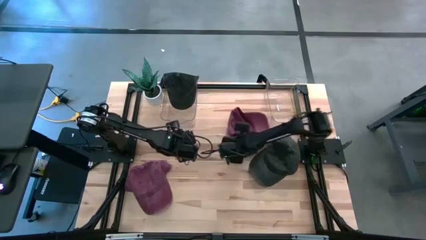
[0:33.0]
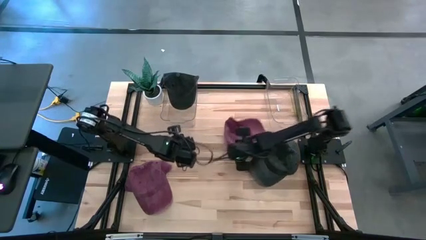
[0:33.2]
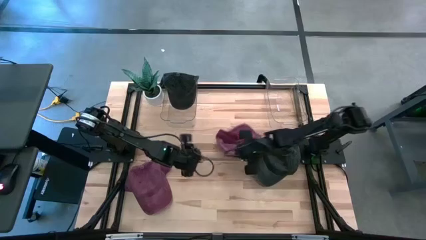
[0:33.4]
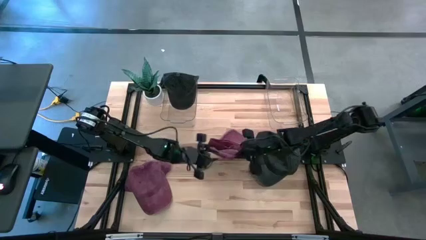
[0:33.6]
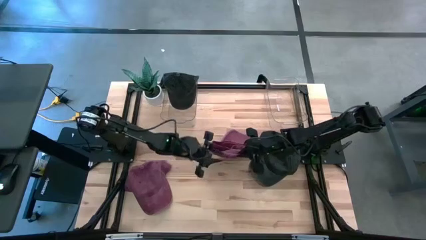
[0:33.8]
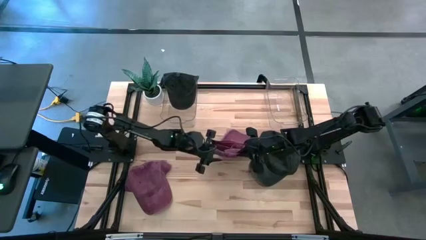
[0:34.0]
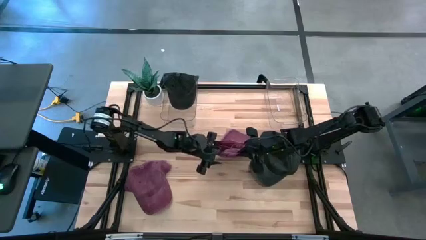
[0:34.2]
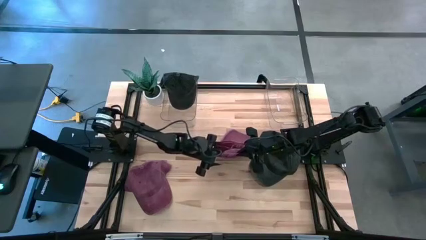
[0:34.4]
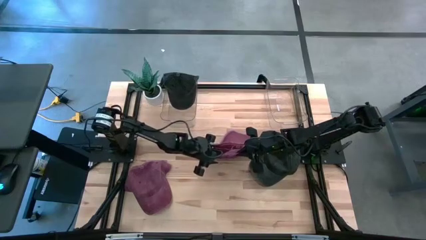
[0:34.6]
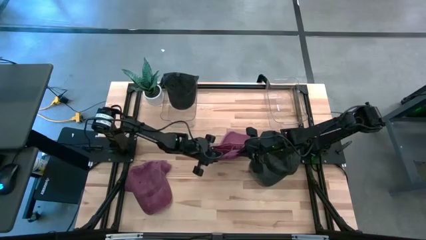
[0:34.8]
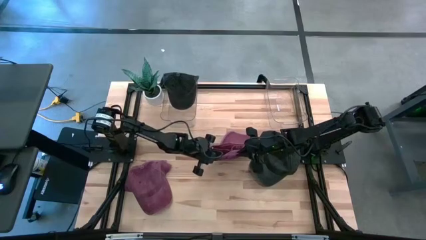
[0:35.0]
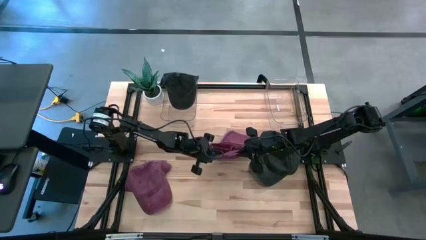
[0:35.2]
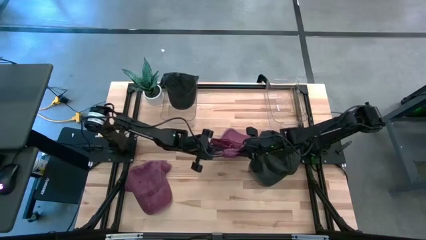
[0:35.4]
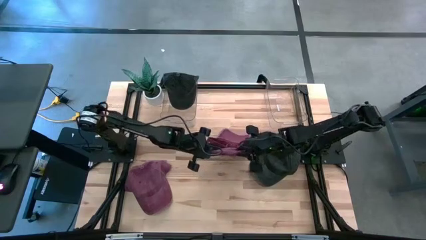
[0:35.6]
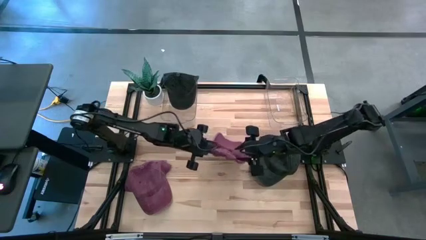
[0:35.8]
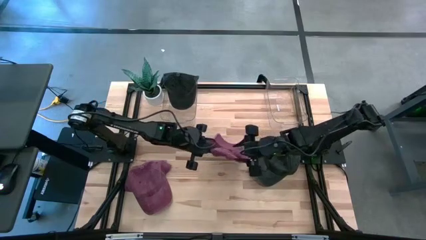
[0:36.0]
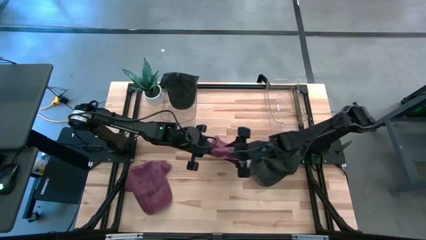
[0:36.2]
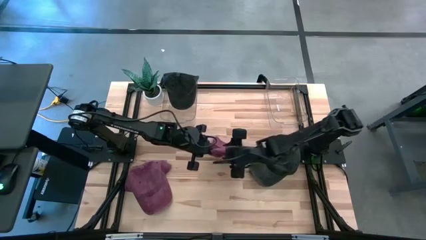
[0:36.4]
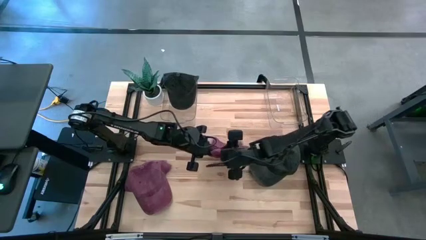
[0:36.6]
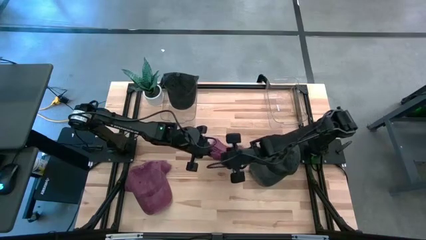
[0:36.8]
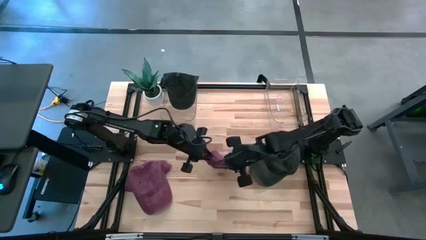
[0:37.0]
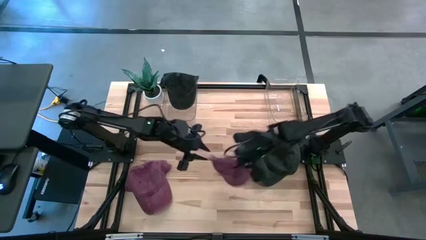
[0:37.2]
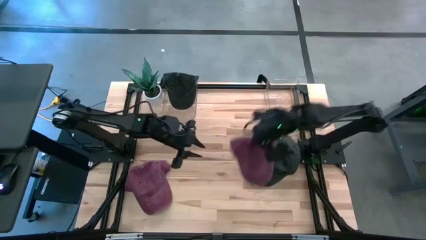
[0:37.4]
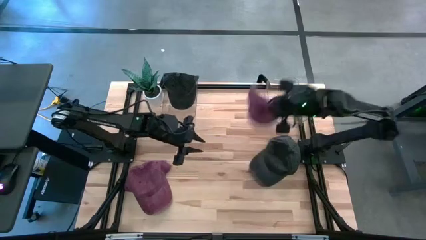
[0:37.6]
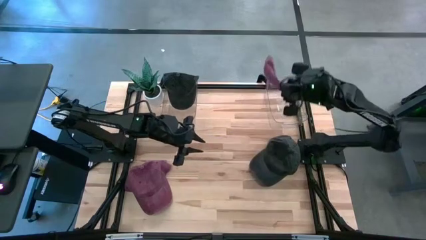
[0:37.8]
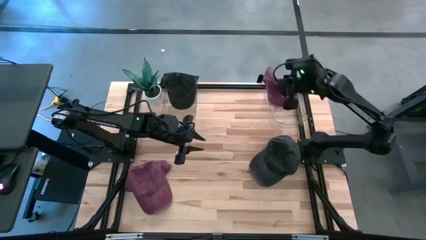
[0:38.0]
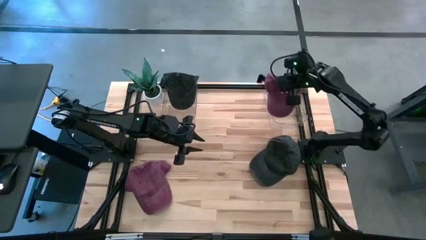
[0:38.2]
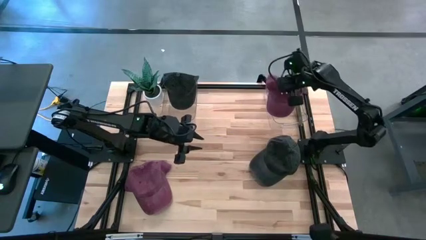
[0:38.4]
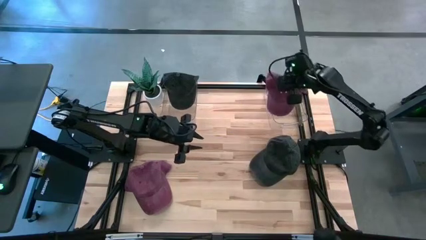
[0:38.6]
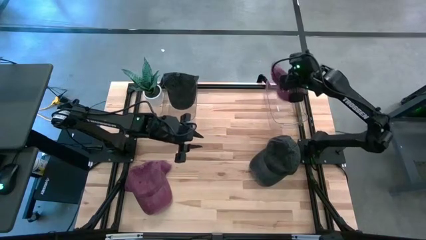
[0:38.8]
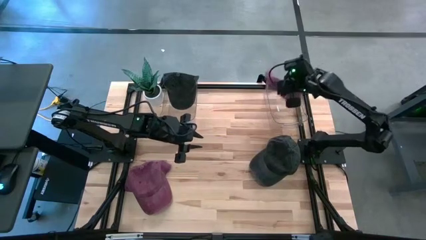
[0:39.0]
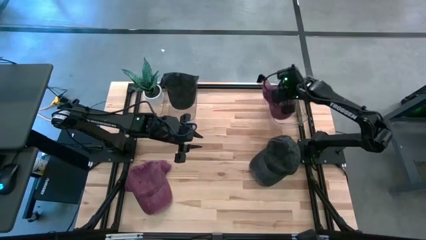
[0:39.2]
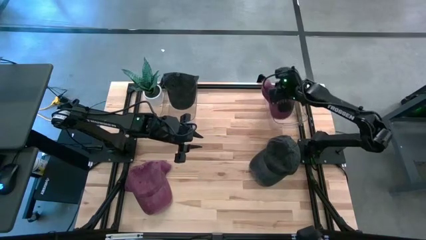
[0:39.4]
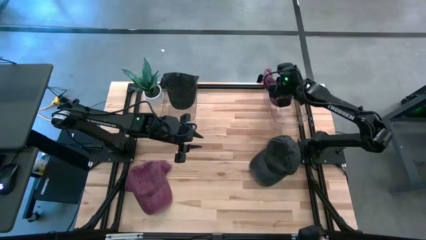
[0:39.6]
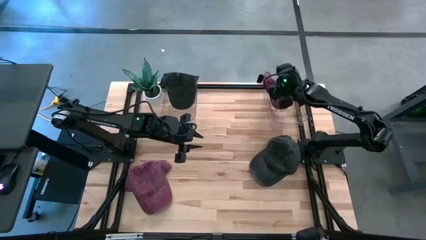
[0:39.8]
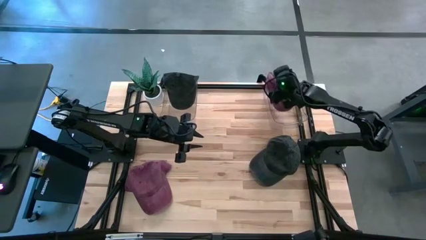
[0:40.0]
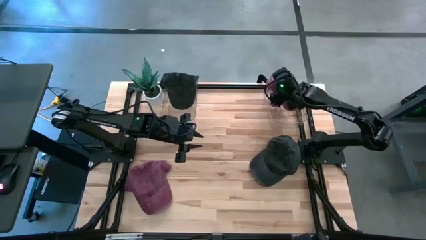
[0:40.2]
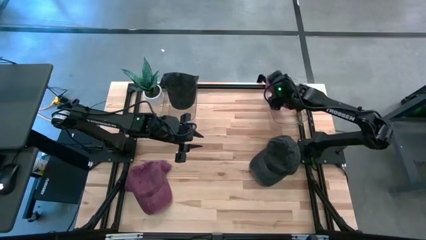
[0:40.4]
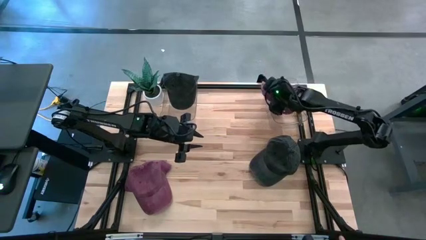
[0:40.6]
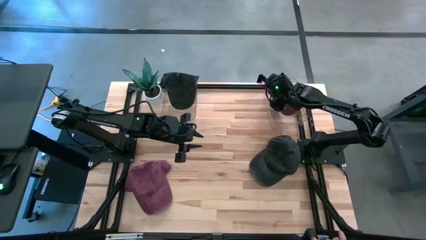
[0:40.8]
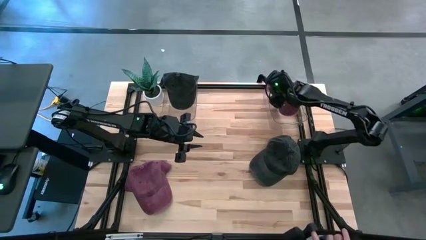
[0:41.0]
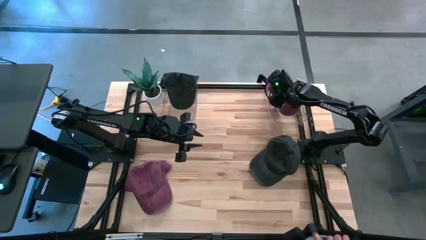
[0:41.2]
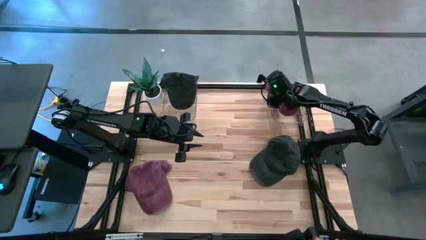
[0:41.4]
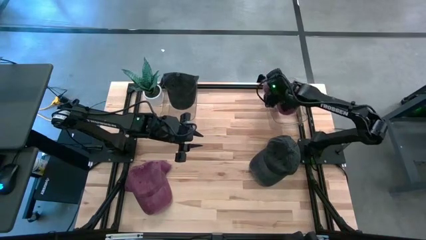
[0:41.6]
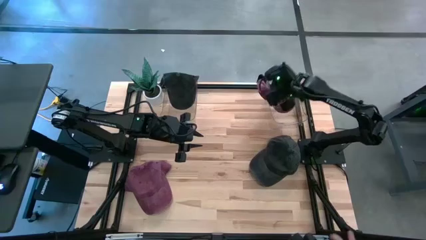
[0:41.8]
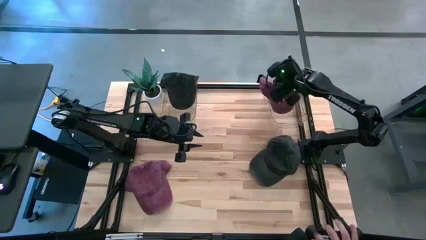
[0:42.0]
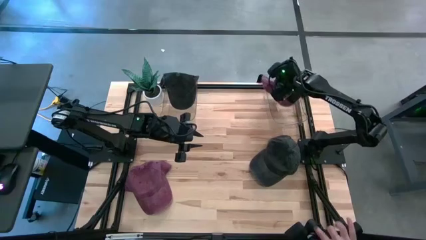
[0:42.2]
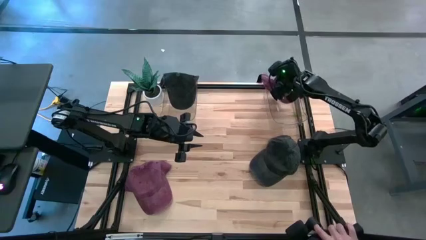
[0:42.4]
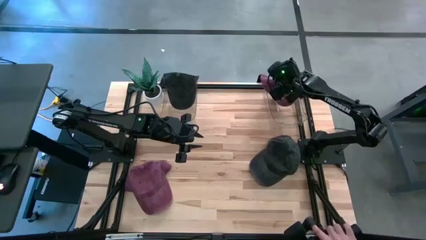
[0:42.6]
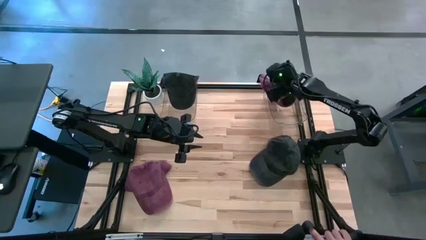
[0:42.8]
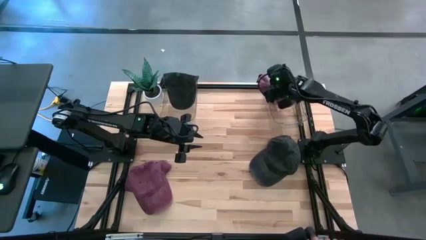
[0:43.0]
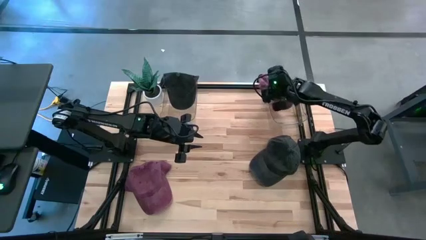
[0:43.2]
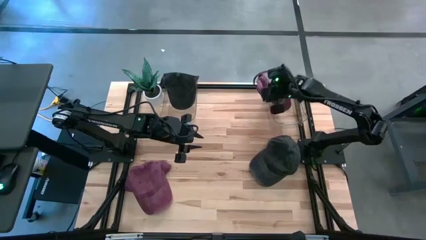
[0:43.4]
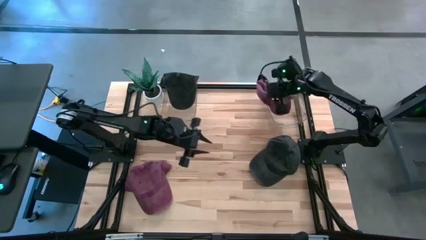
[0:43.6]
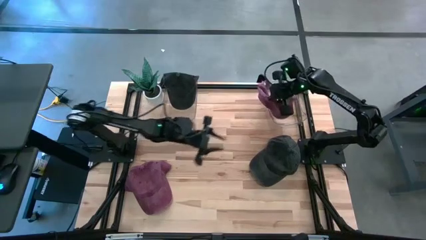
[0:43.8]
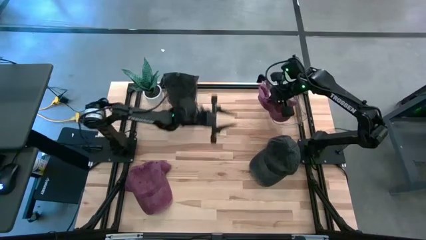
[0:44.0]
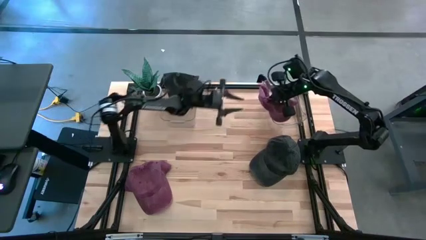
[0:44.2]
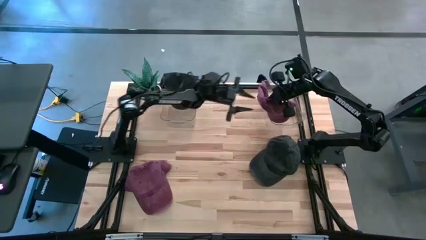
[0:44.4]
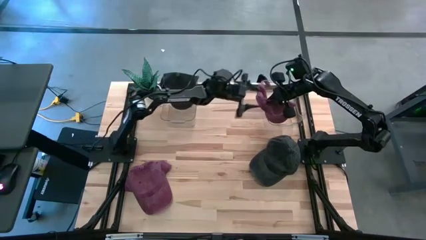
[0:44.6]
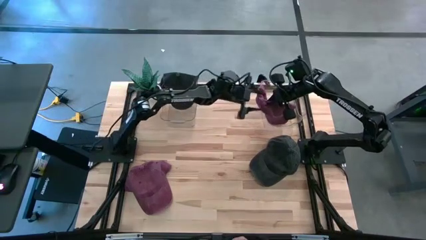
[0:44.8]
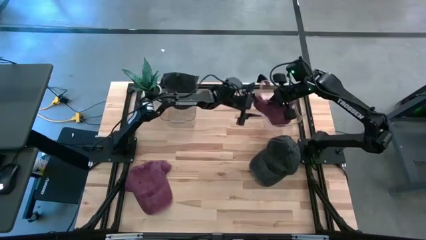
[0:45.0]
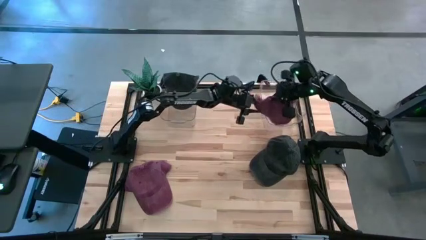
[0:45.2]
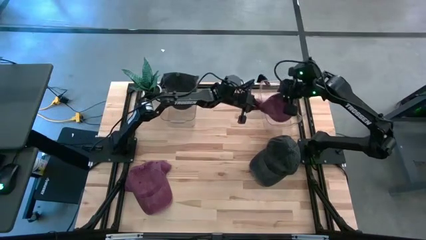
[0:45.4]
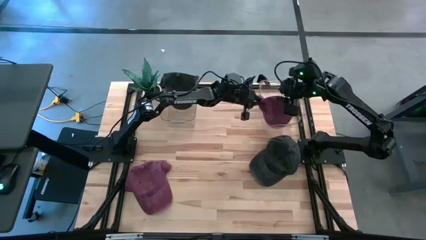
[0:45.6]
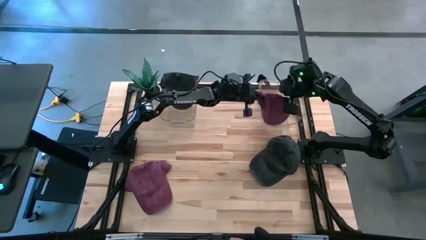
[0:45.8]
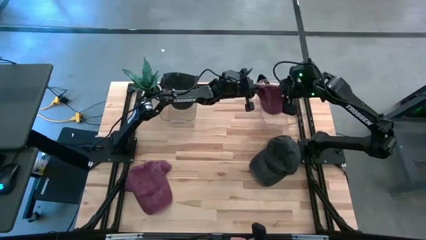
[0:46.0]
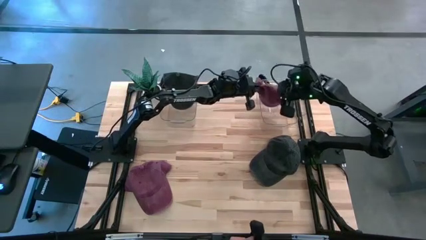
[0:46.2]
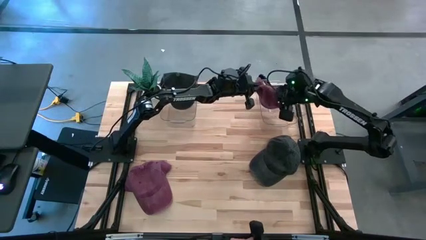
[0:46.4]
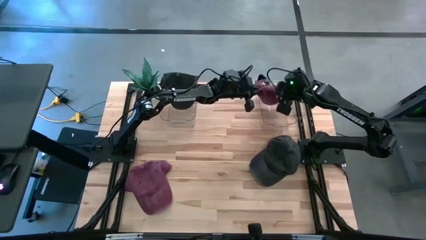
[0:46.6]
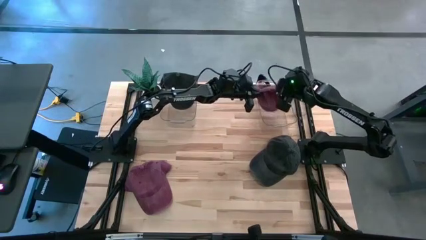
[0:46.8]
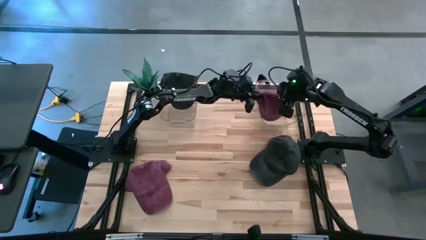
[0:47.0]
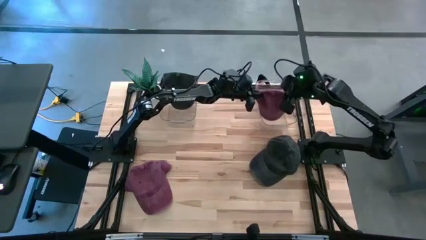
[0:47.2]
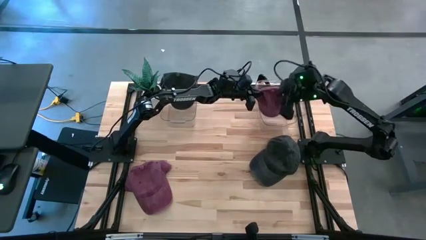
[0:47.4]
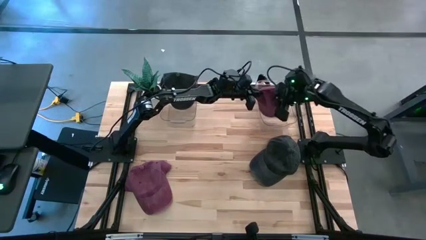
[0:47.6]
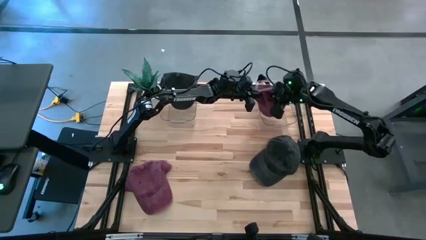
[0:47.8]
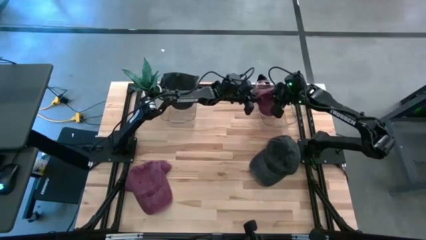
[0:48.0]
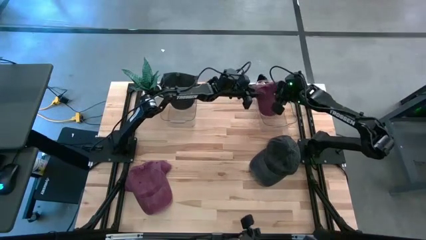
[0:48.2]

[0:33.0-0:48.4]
Task: Pick & Place hat
Put the right red cap into the right transparent bin
